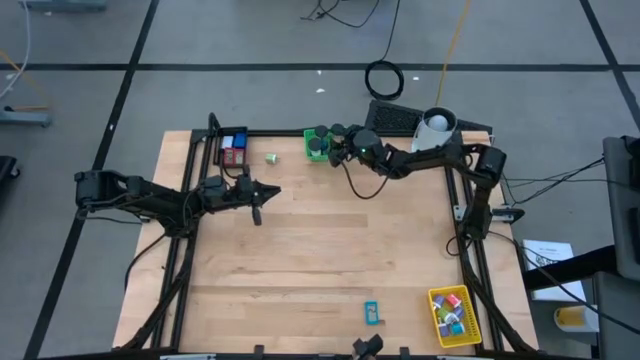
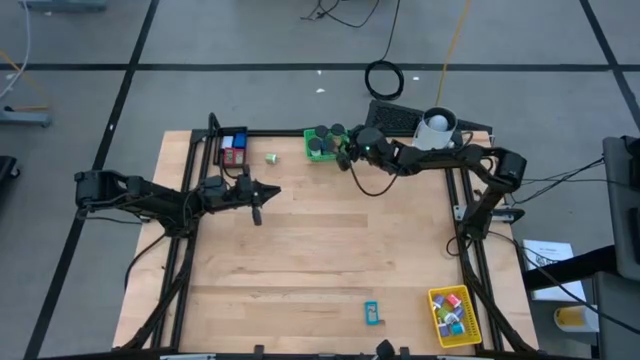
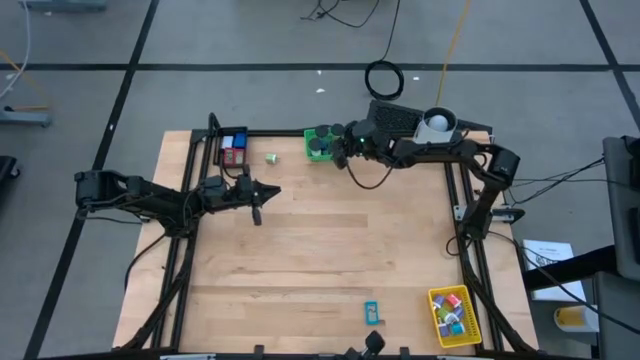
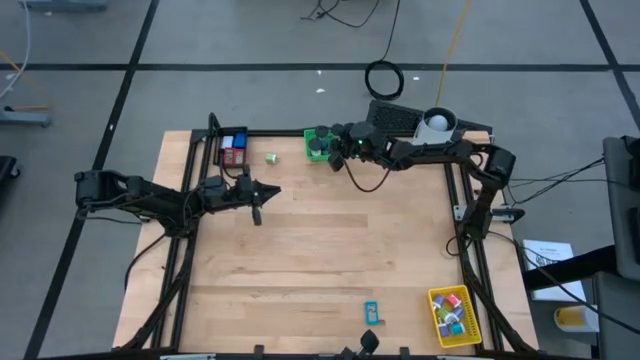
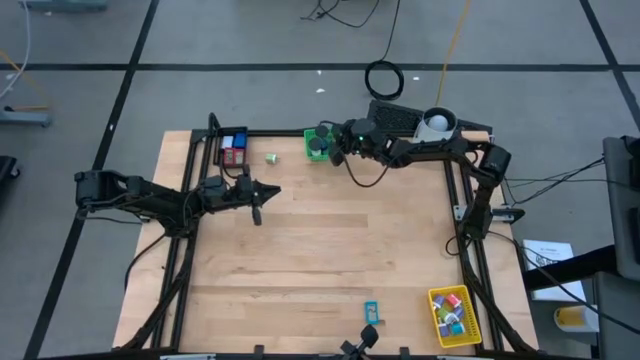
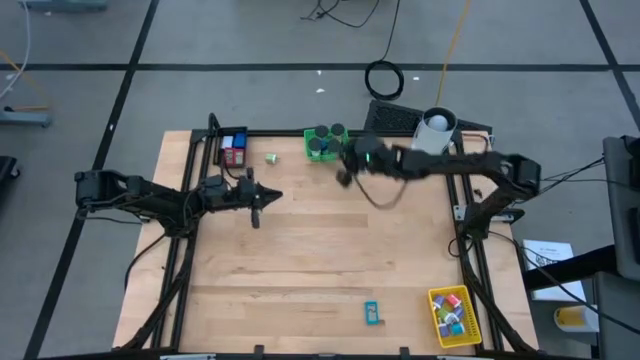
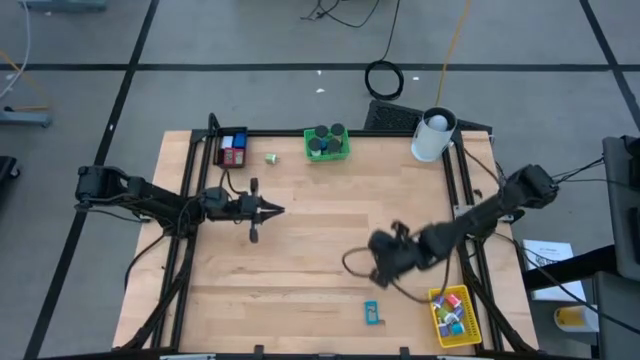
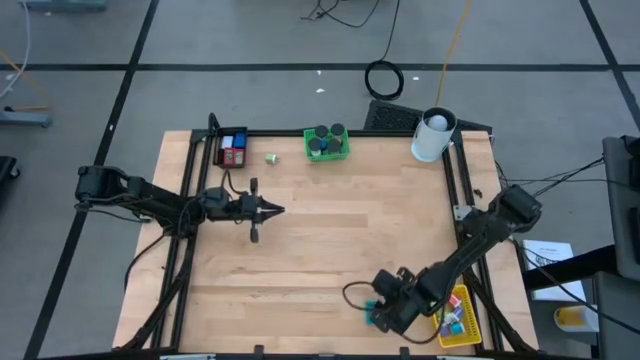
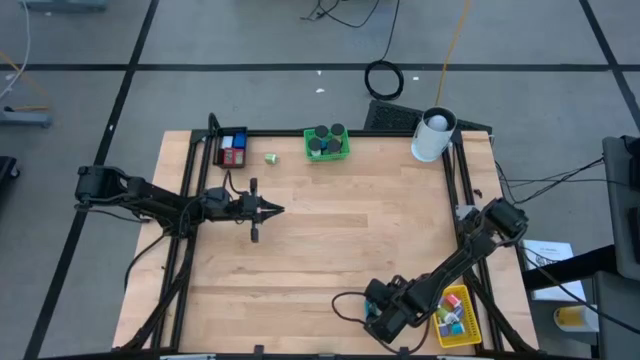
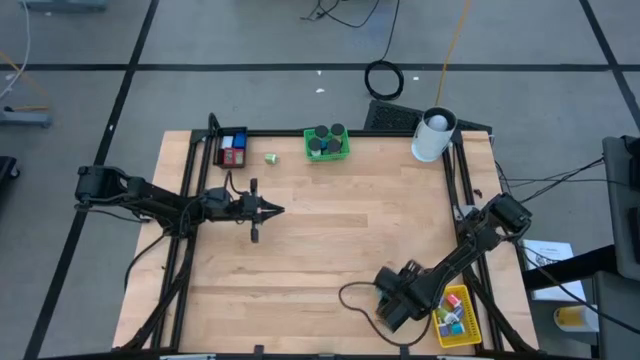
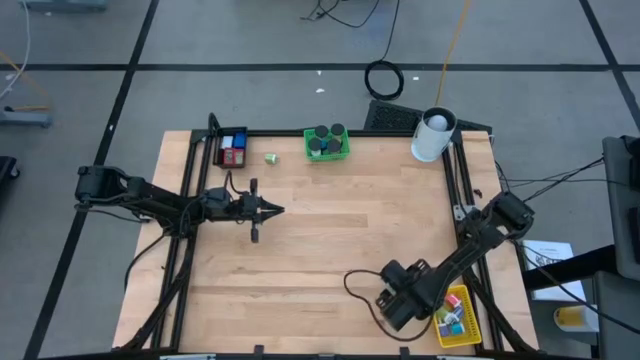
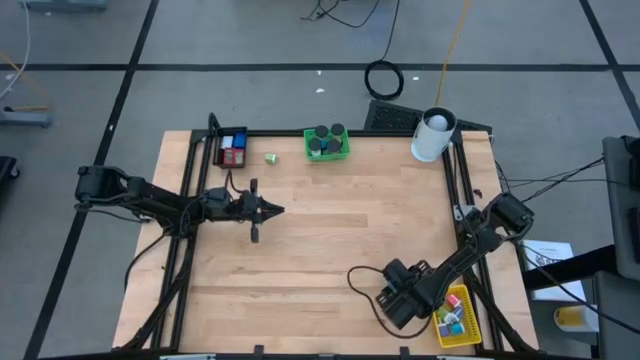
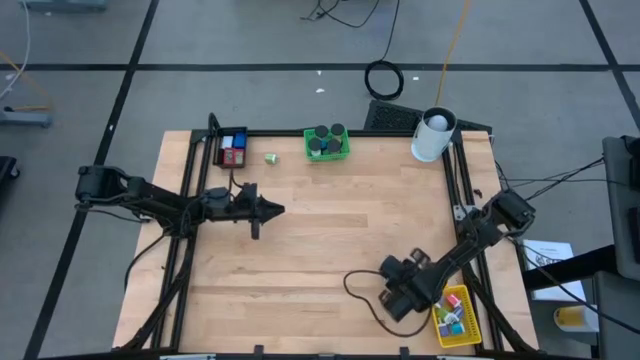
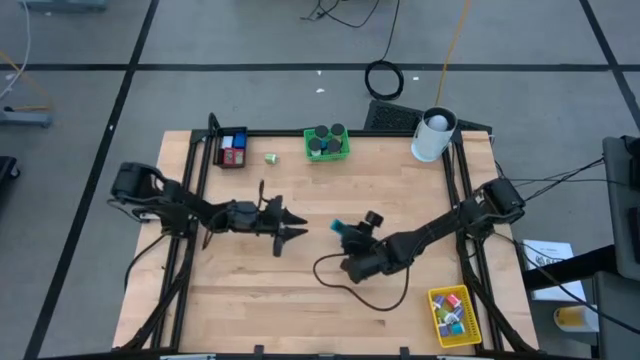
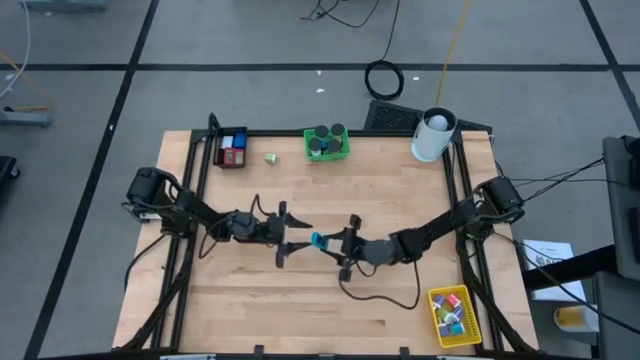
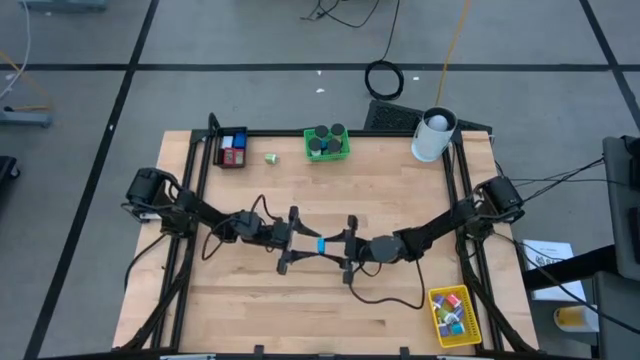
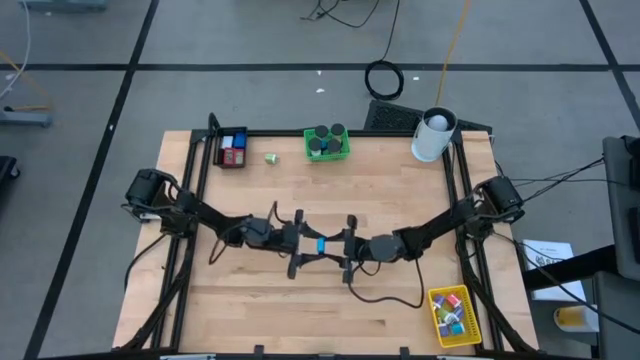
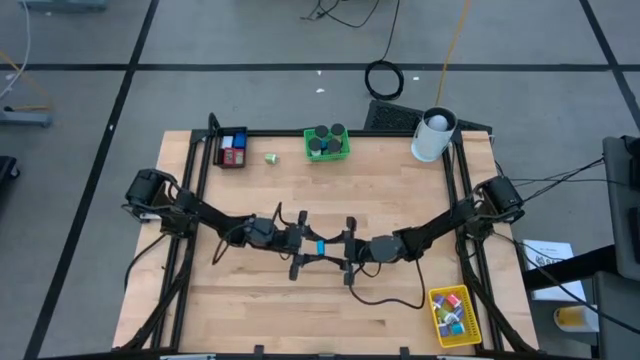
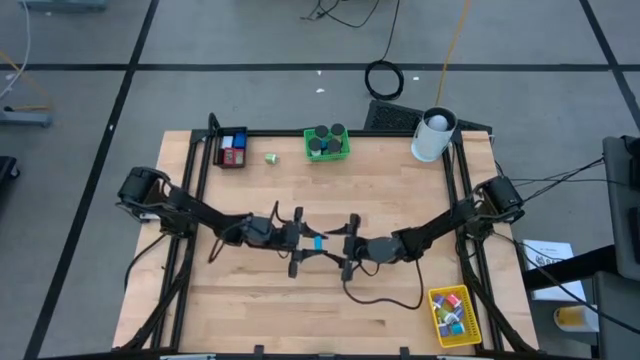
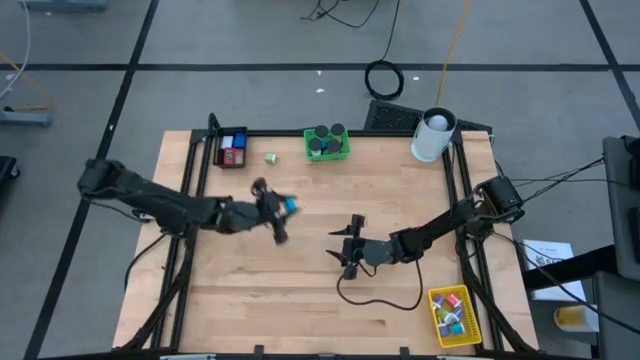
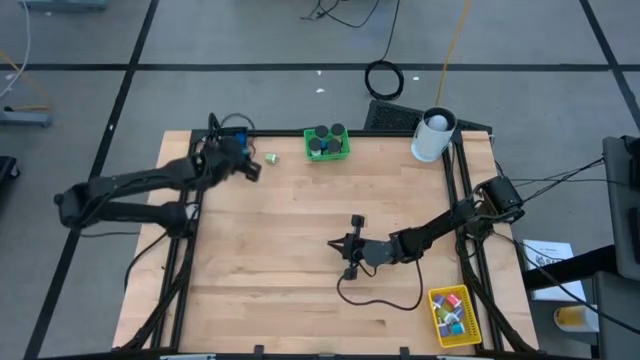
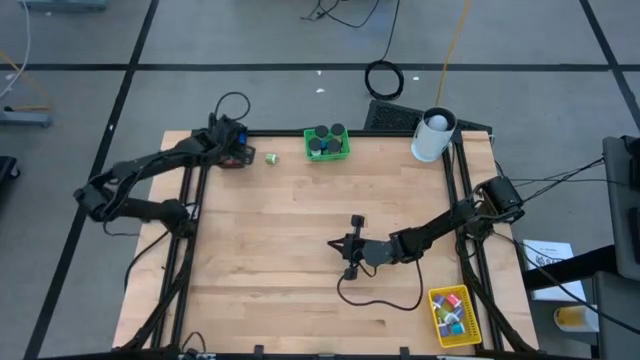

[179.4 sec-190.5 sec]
Task: Pick & Place Office items
Put the blue digital clock into the black basket

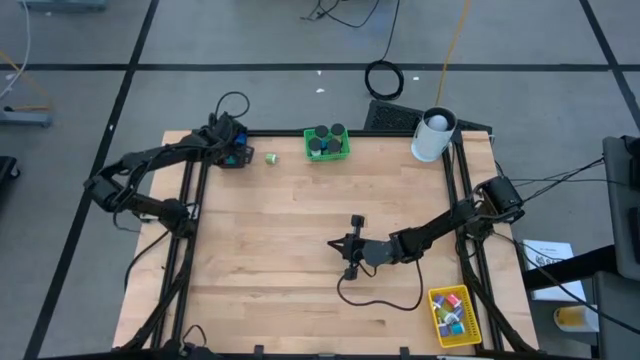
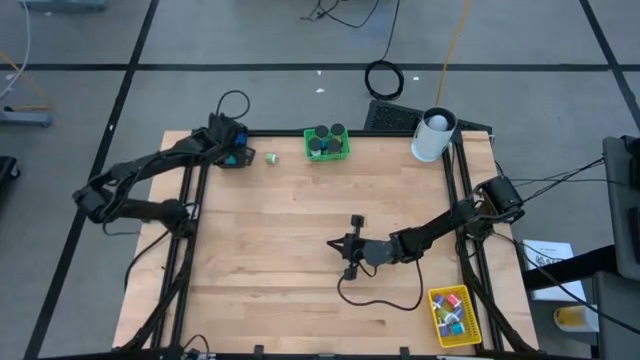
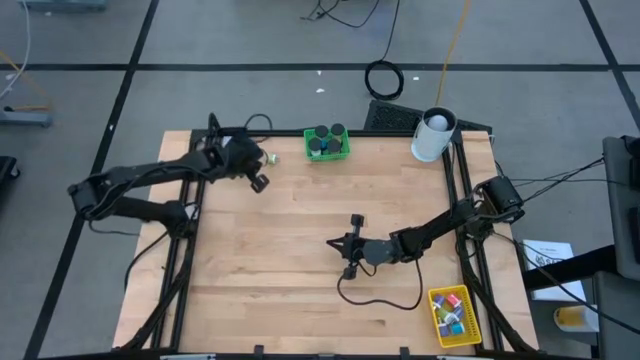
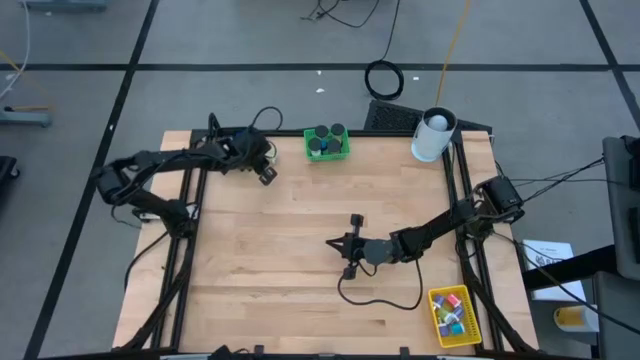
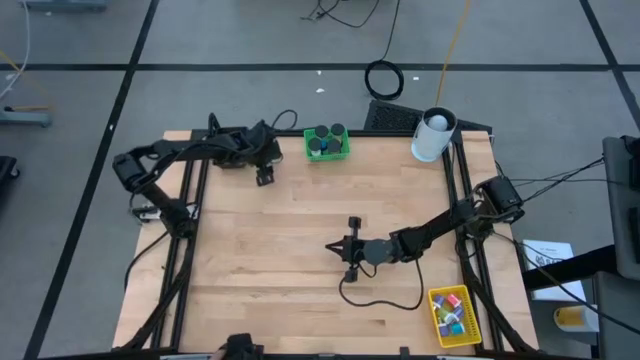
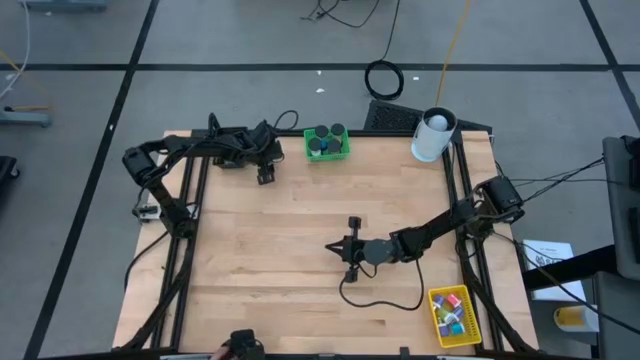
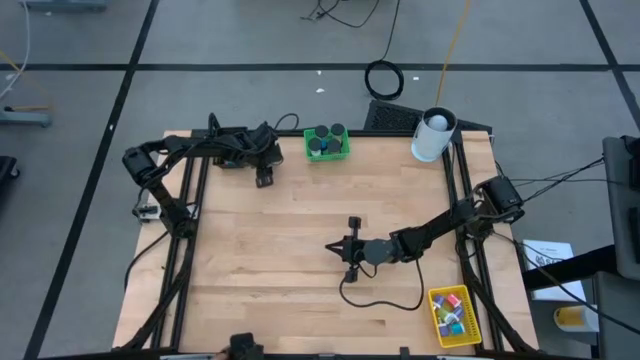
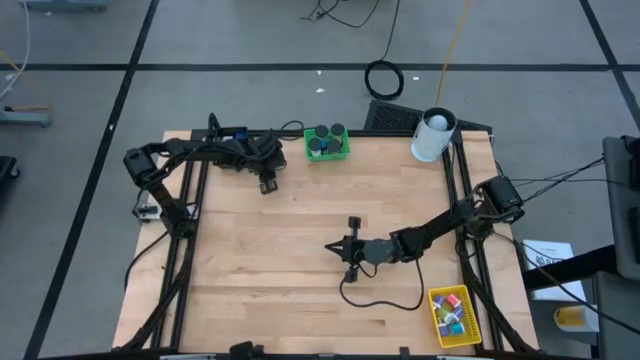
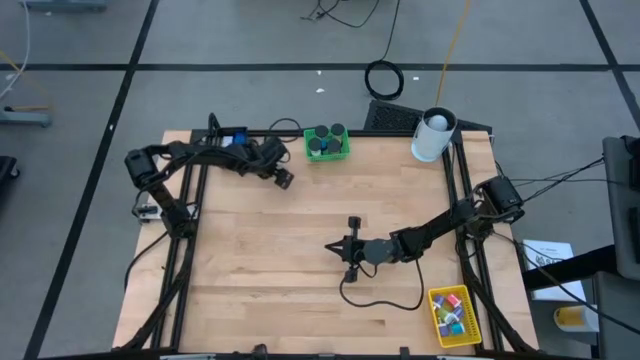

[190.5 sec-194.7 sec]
Put the green charger adapter into the yellow basket

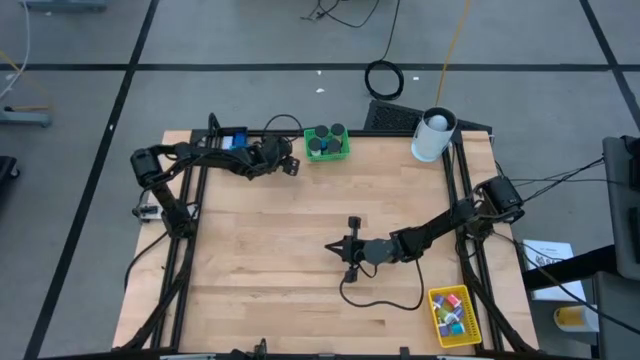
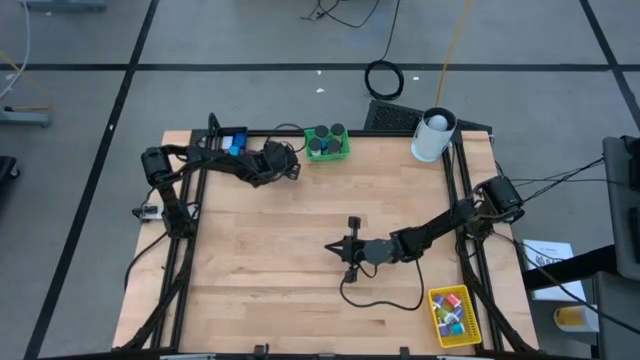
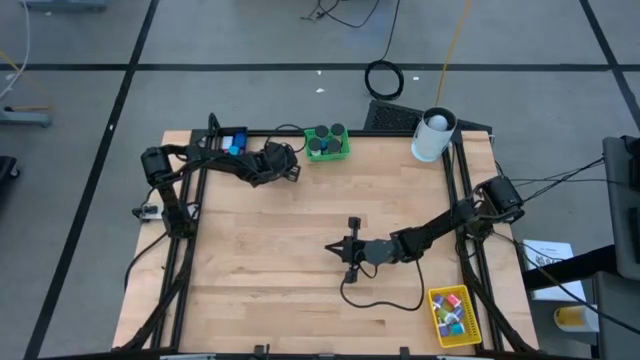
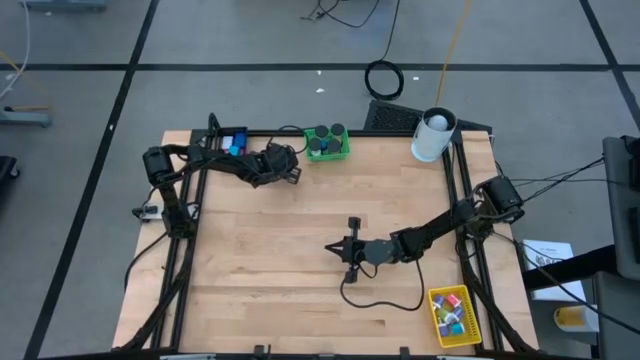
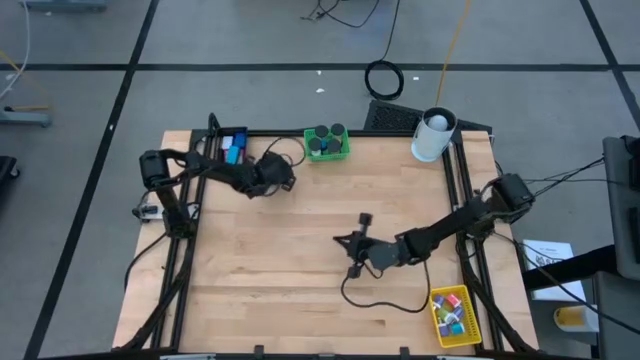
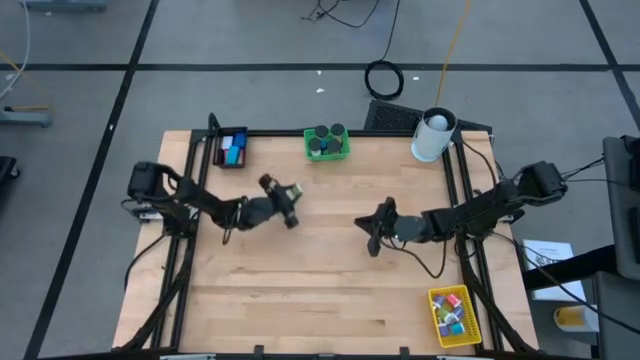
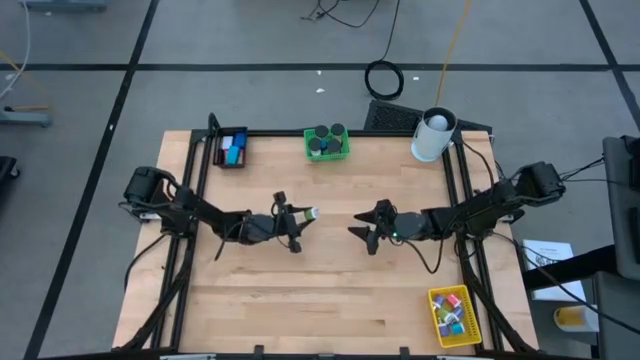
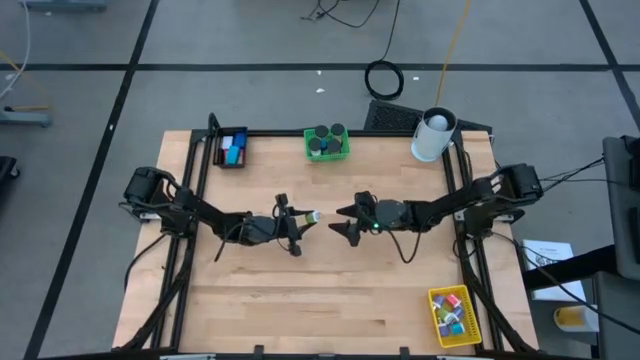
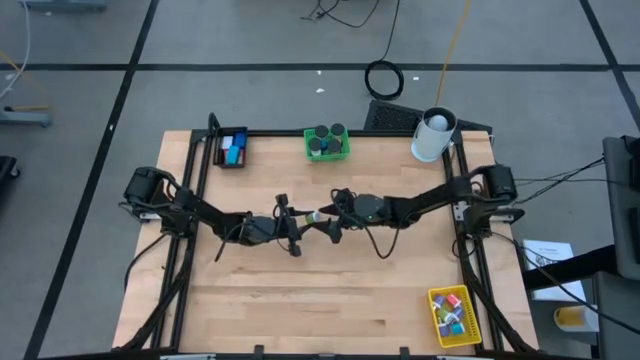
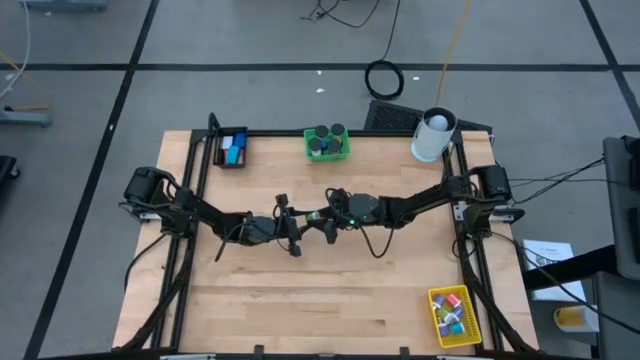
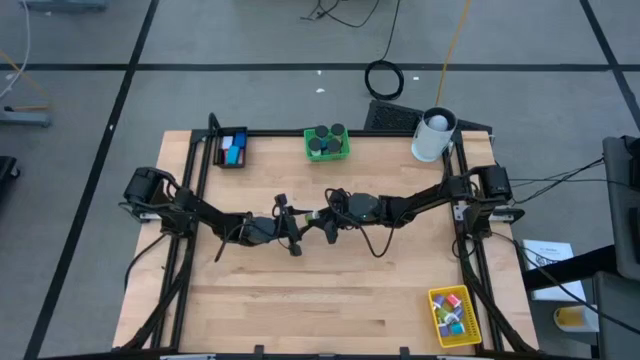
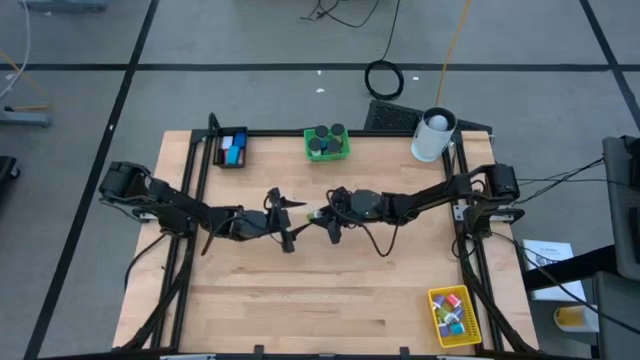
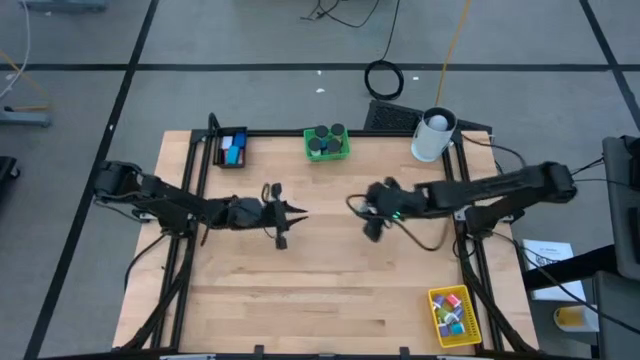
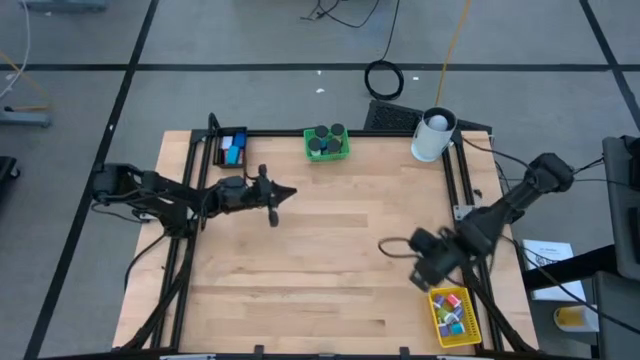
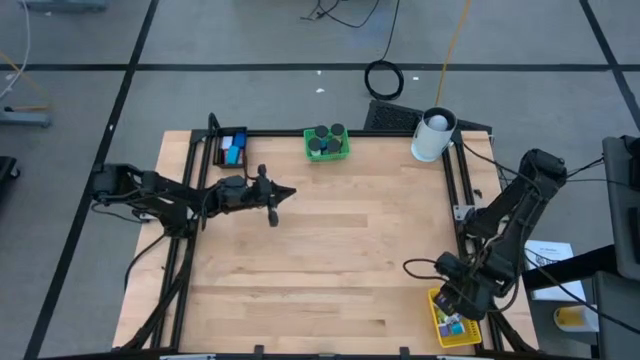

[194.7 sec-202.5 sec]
Put the green charger adapter into the yellow basket
